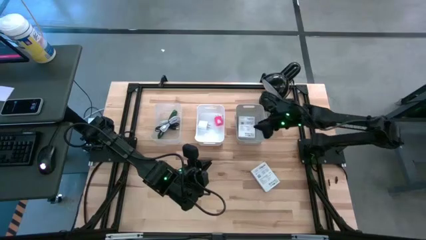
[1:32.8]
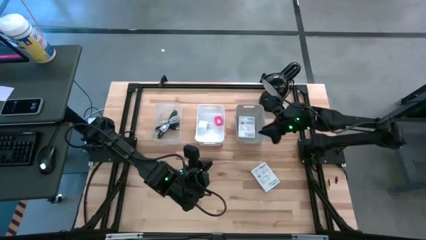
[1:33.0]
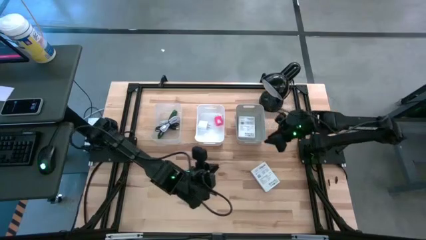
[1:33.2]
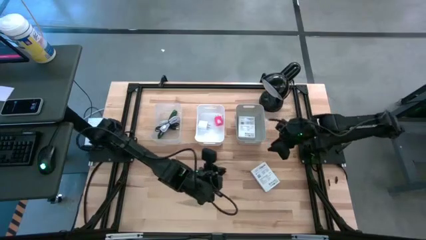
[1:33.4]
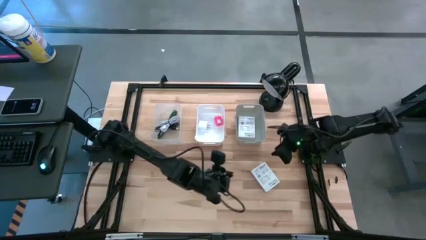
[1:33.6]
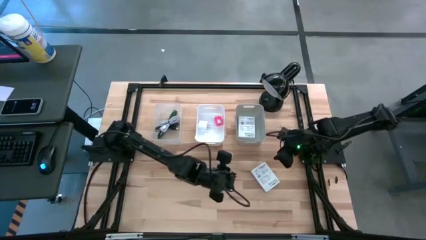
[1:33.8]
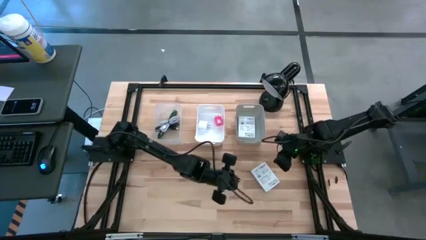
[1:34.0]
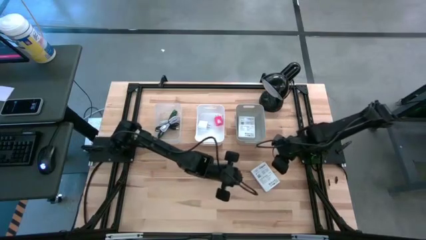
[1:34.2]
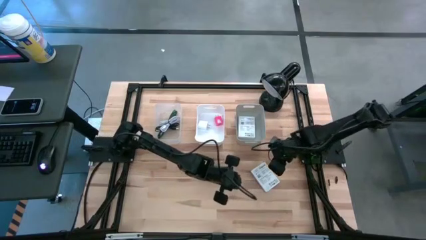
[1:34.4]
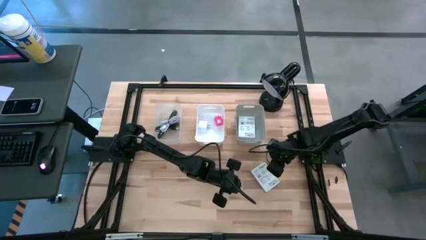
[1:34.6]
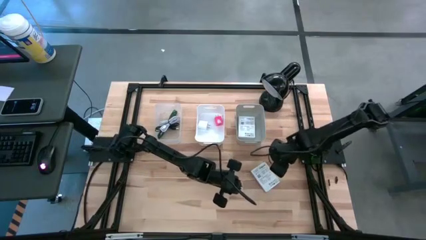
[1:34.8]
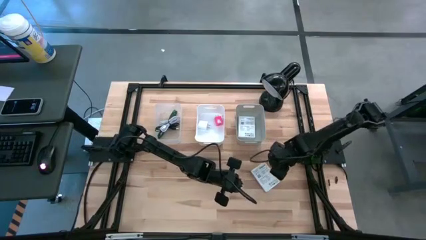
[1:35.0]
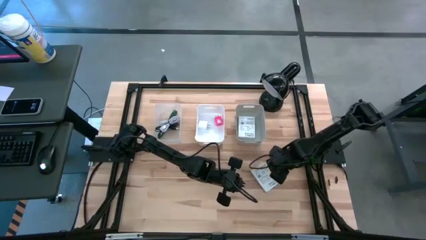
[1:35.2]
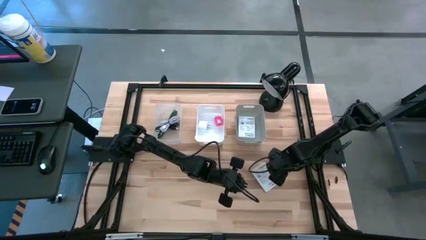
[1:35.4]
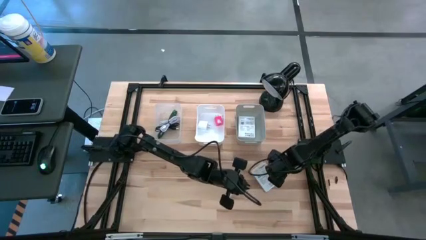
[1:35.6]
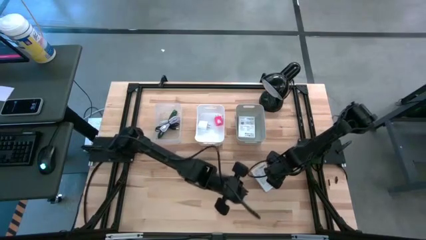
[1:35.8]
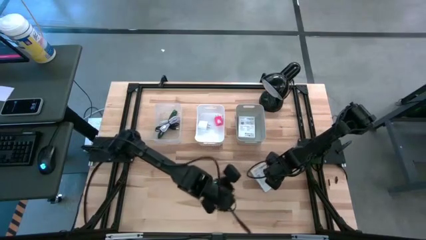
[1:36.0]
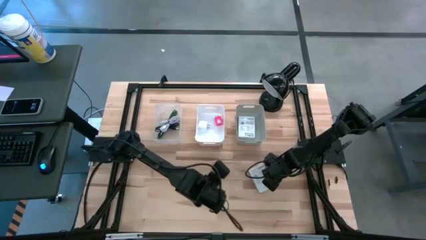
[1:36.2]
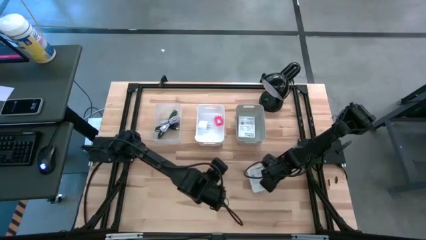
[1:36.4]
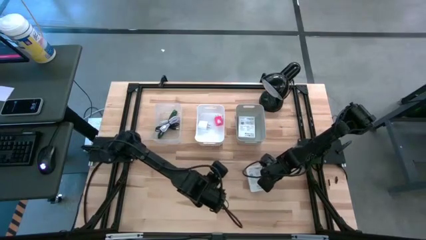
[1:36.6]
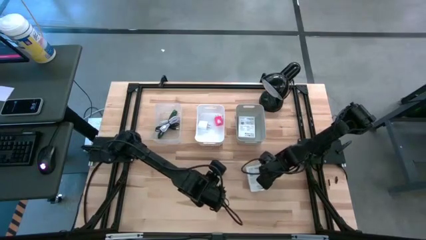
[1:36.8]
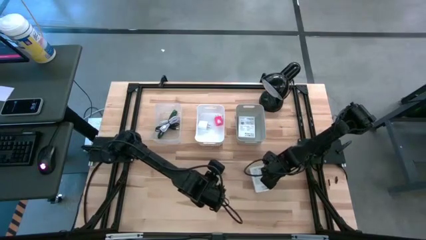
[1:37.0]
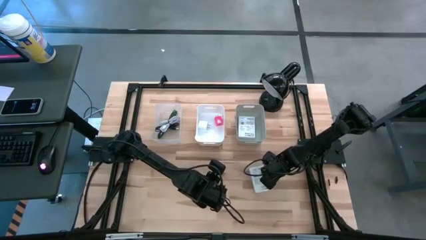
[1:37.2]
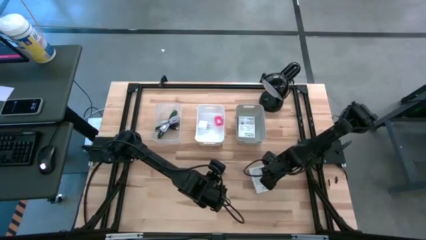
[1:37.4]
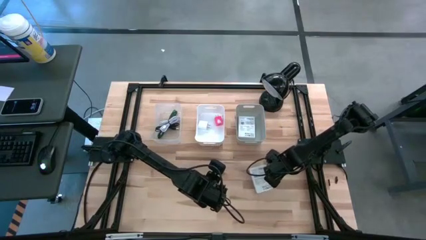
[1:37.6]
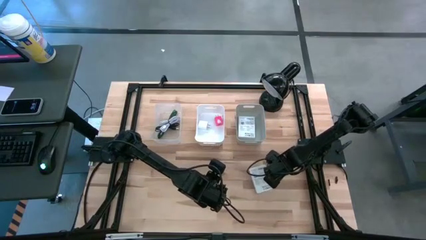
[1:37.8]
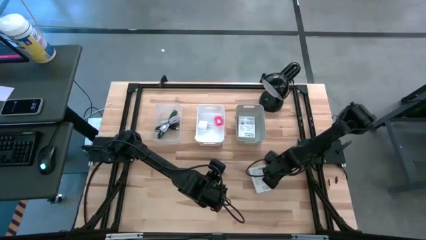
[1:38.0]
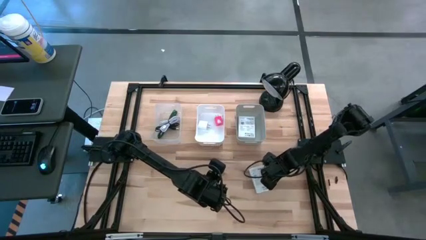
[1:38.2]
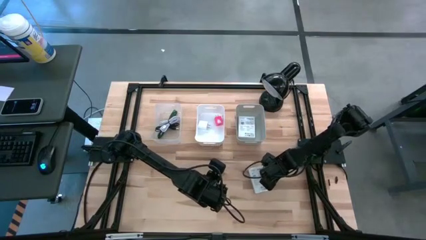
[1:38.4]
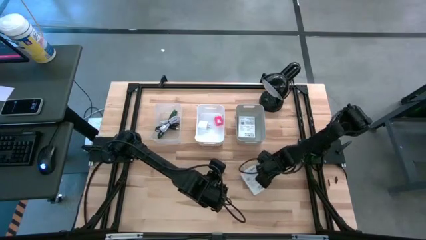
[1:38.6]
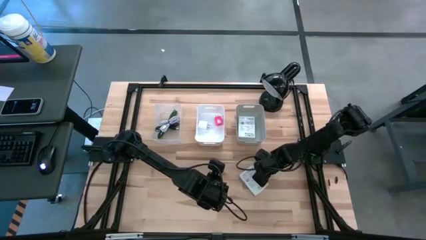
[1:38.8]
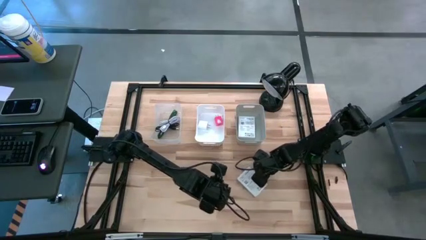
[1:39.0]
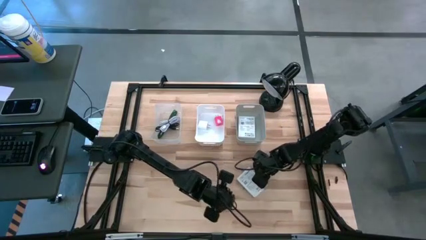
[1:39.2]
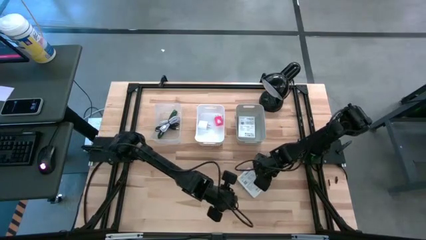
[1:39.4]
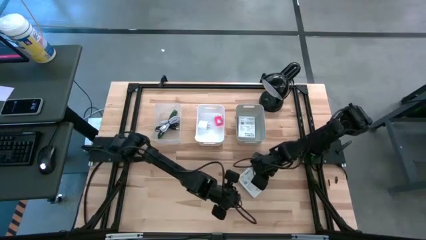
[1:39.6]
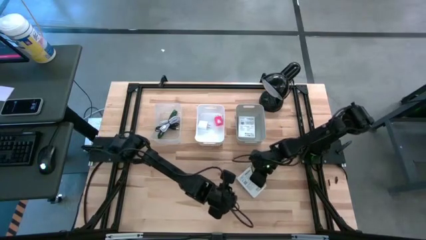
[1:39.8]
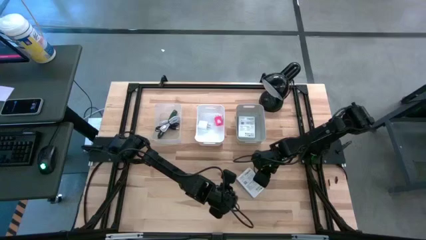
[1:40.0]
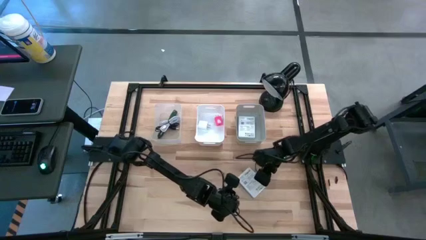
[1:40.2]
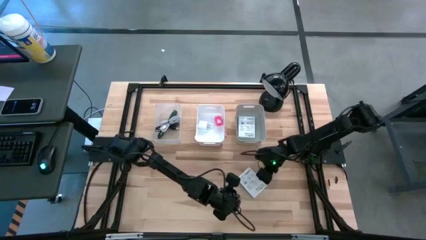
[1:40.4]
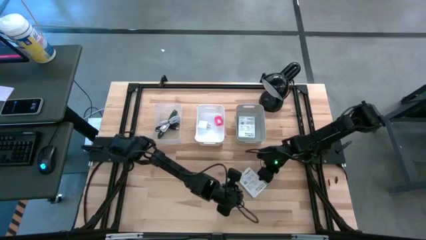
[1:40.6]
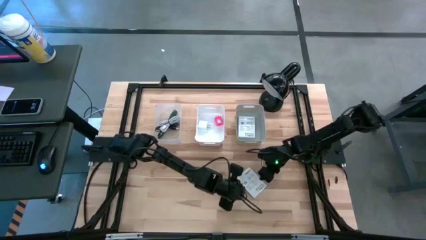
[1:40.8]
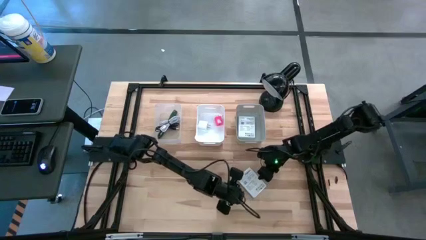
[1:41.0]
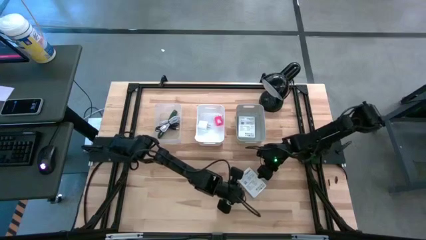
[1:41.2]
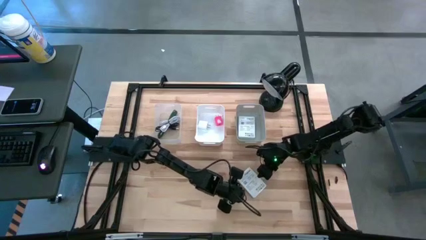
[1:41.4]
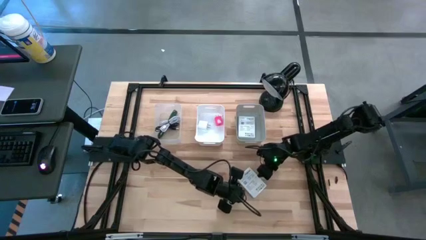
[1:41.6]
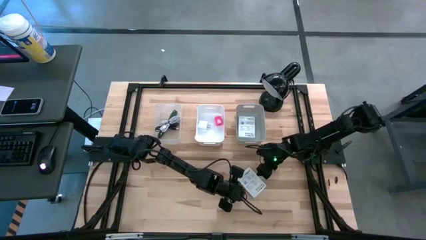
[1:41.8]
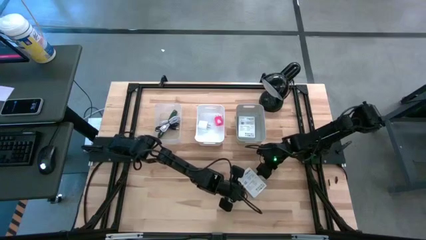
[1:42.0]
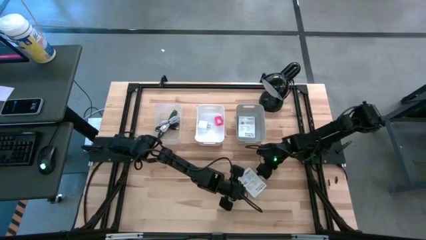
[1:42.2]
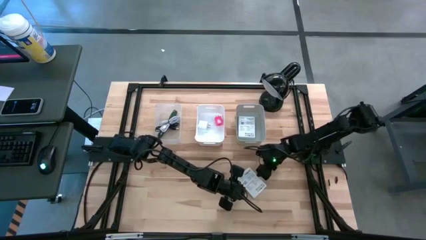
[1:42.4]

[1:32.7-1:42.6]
Task: Pick and place items into bin
Put the card reader into the gray bin
